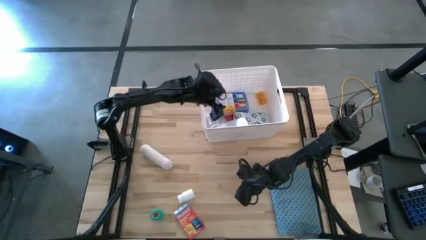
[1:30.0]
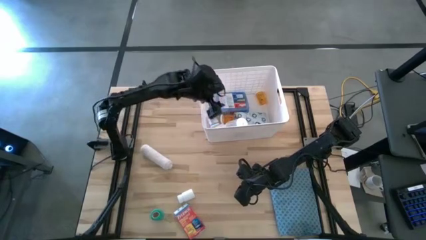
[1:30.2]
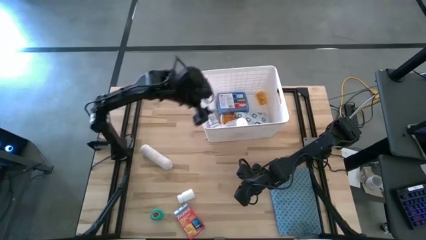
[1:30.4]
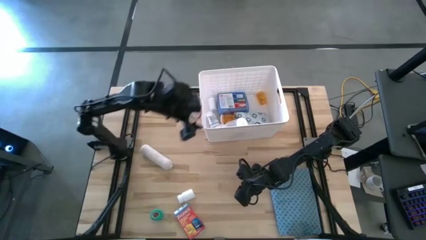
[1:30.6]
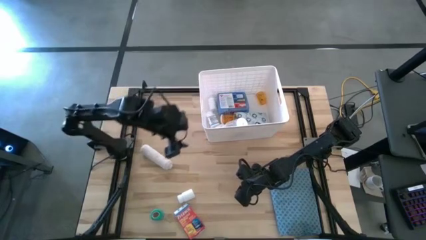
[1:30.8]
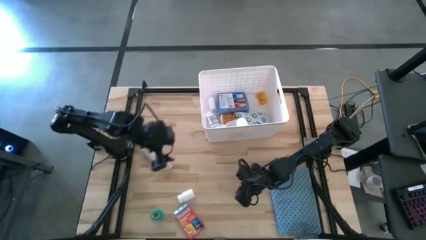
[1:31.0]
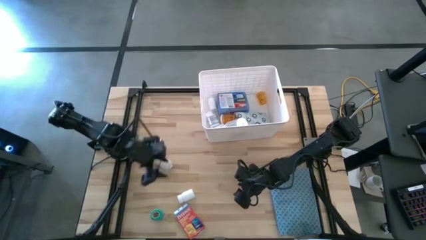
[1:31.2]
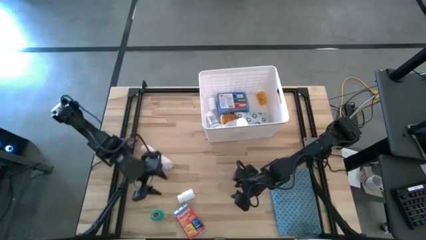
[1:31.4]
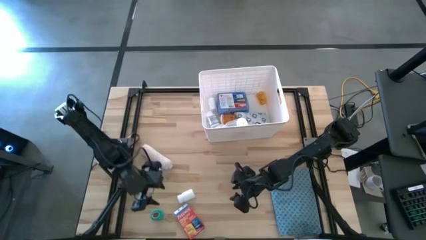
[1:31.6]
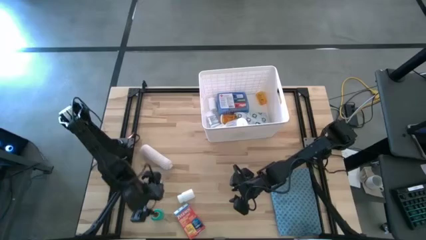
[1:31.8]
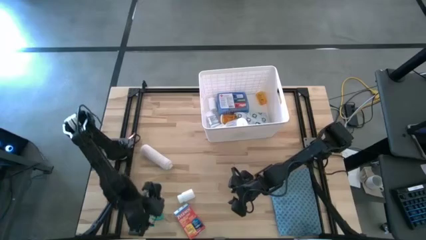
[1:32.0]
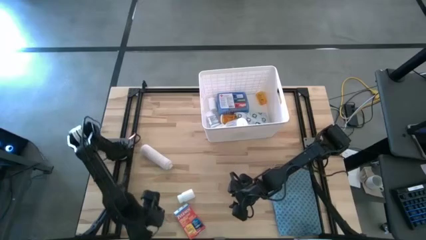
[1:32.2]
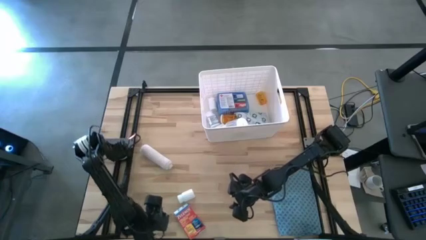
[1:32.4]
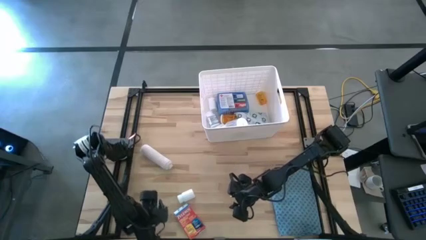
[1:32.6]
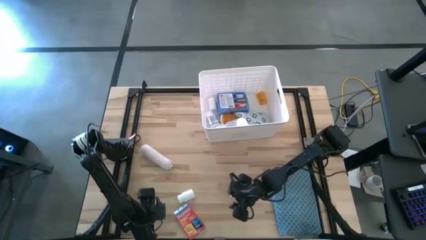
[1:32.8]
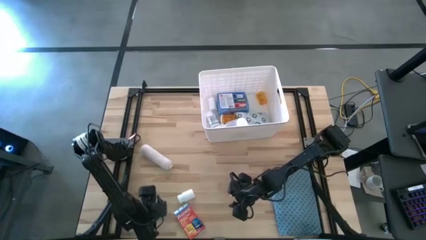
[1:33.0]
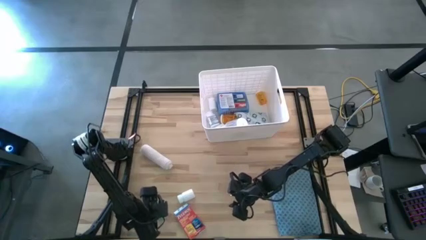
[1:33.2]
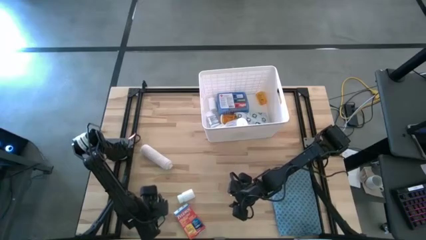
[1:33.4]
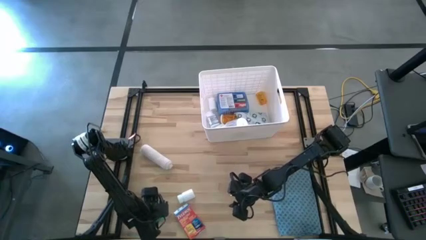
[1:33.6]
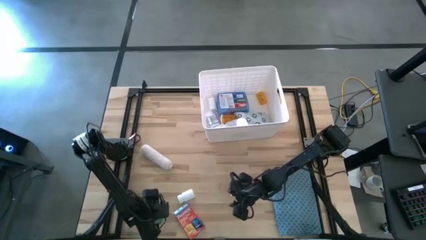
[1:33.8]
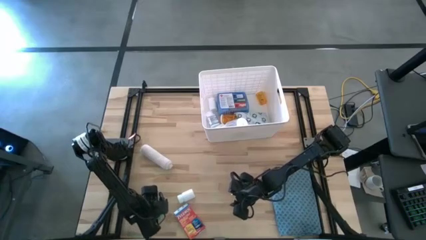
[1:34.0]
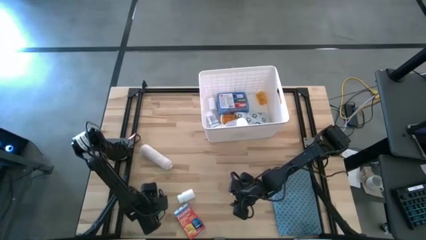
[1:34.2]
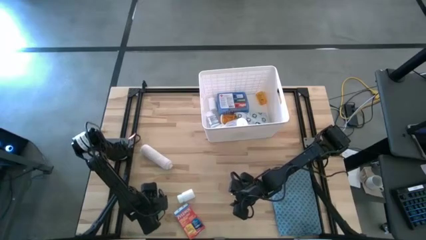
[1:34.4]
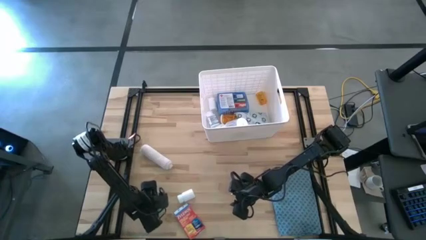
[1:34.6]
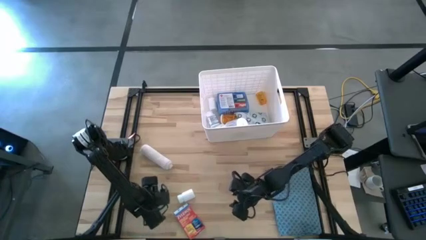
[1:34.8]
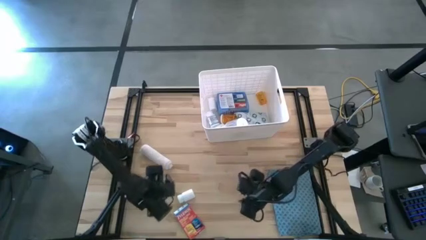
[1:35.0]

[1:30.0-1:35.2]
Task: Pick & place medical supplies in basket/bin
Put the green bandage into the white bin

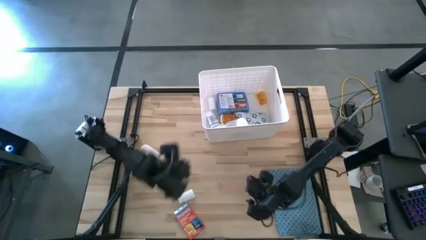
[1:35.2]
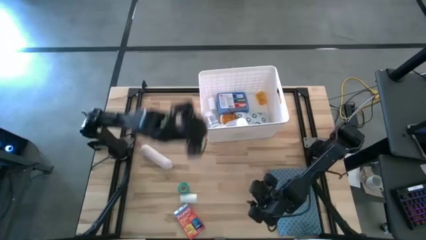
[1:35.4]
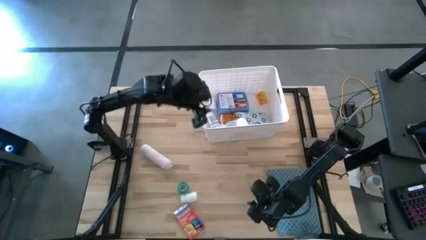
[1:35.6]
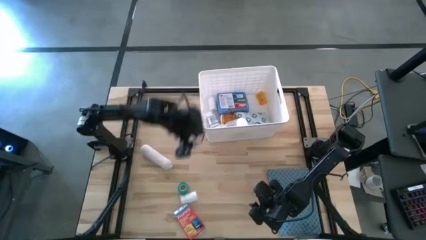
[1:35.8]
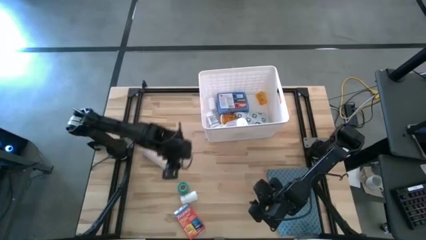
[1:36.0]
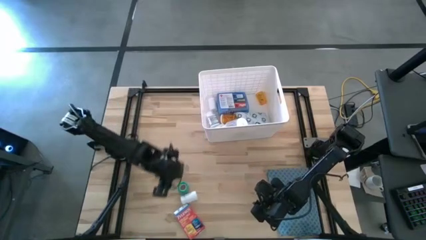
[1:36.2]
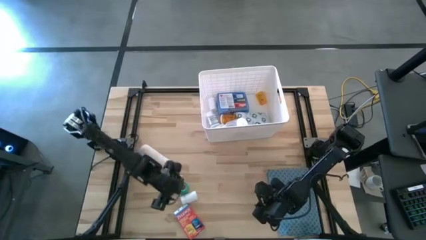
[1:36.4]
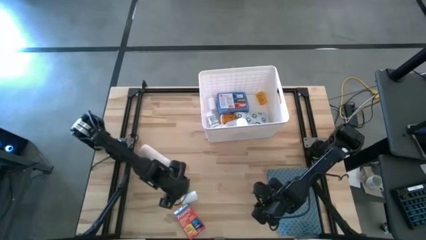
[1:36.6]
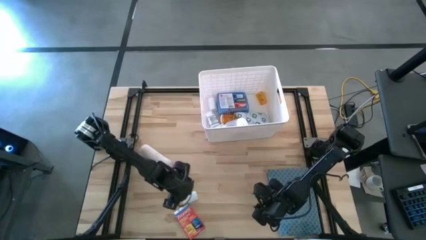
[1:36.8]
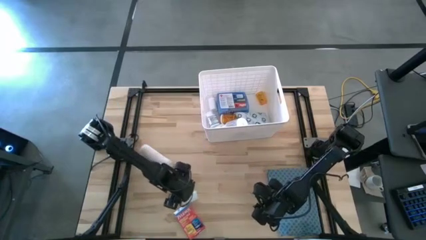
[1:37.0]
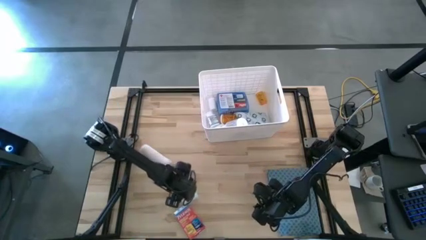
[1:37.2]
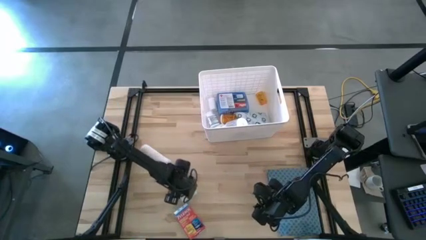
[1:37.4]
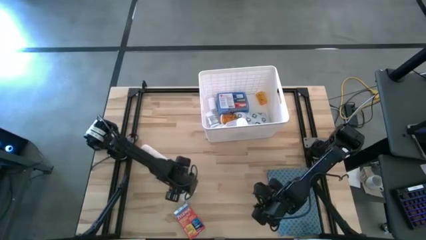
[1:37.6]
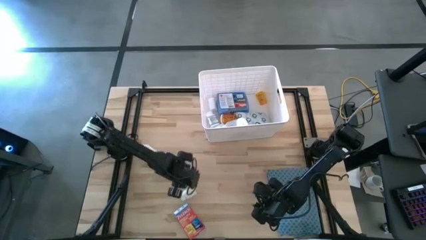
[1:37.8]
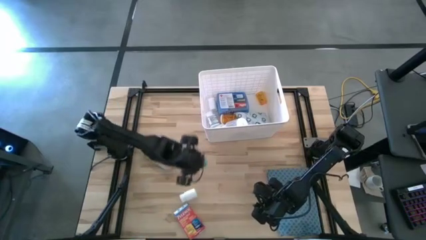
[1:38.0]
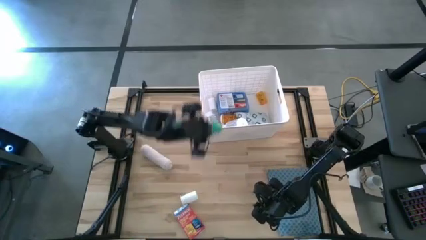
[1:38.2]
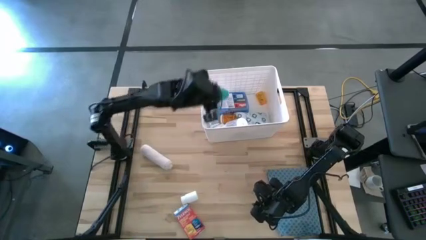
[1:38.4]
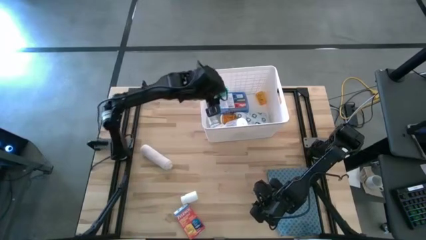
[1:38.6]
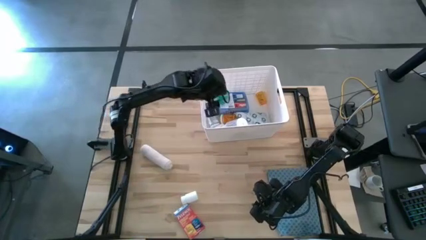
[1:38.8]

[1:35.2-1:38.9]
Put the green bandage into the white bin

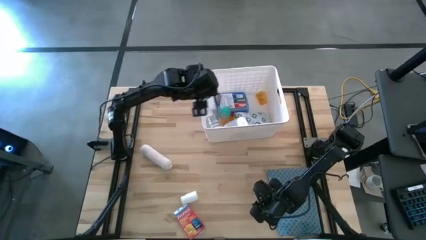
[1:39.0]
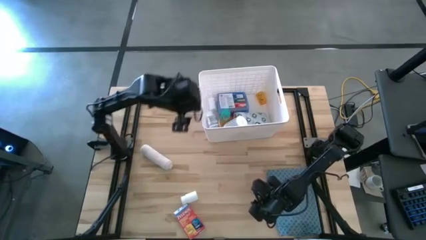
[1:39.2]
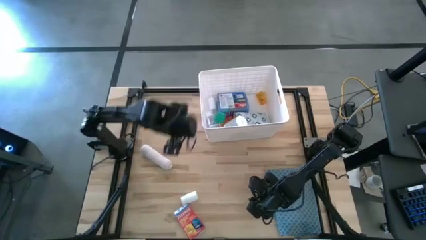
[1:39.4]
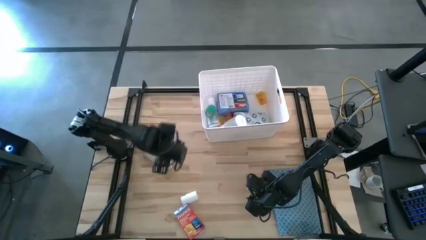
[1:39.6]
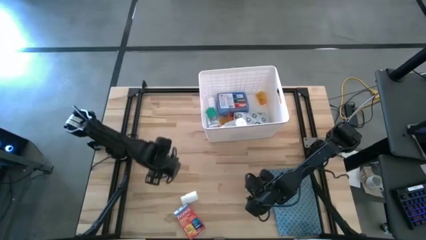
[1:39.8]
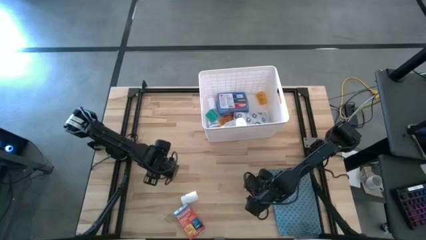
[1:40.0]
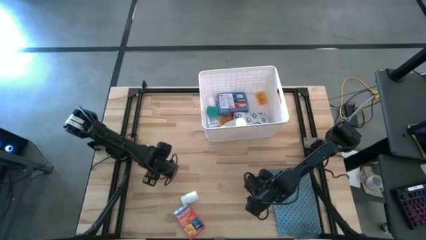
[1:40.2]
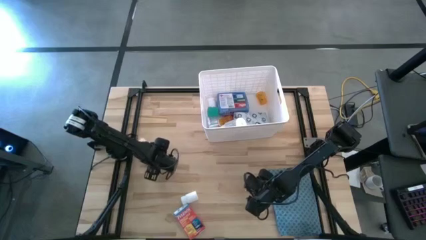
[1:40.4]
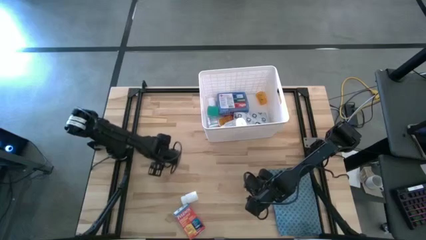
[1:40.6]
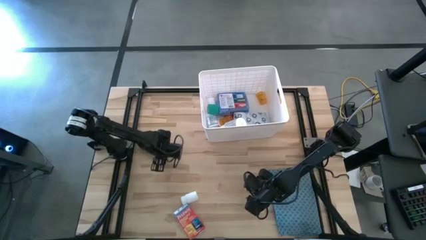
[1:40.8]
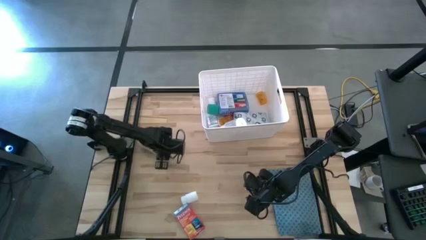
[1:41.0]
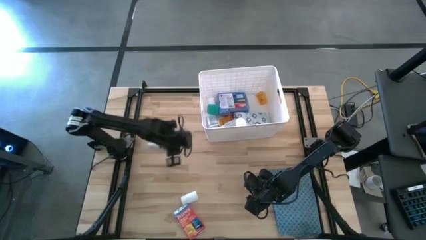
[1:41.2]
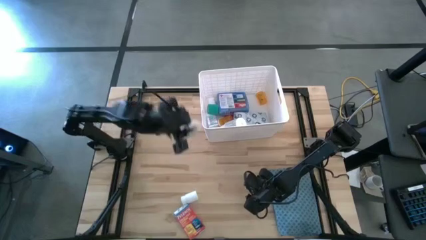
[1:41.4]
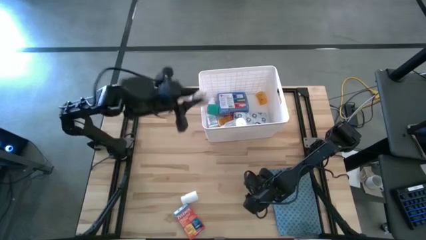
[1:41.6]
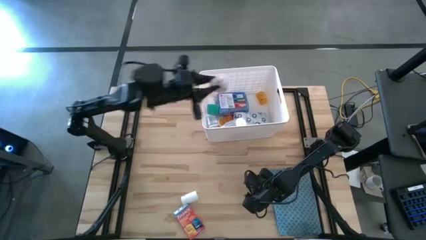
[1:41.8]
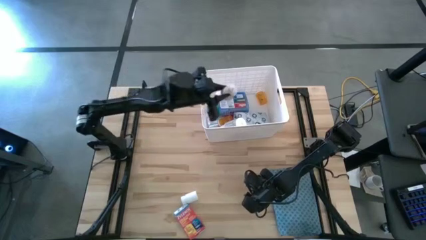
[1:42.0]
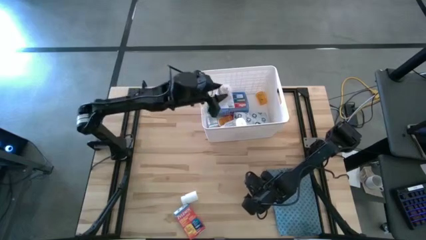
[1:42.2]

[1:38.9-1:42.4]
Put the white bandage into the white bin

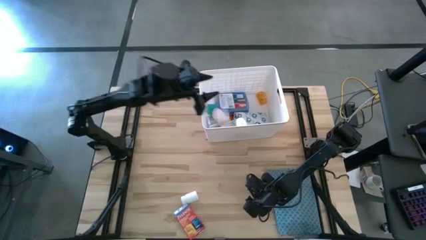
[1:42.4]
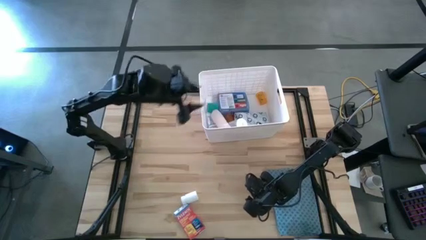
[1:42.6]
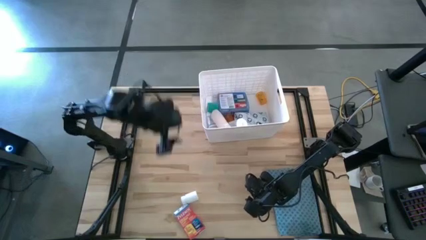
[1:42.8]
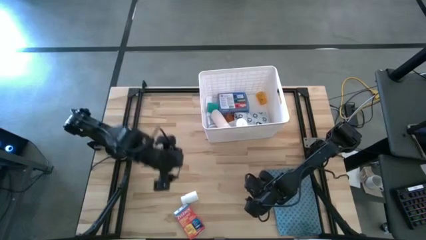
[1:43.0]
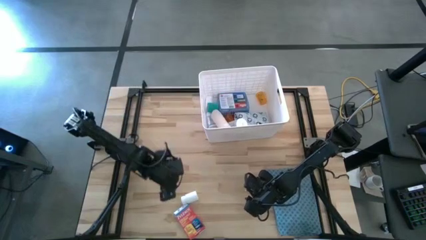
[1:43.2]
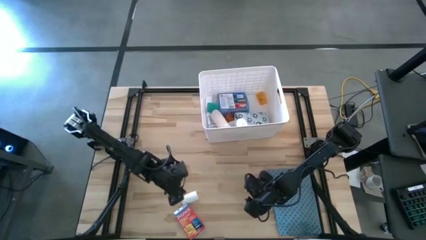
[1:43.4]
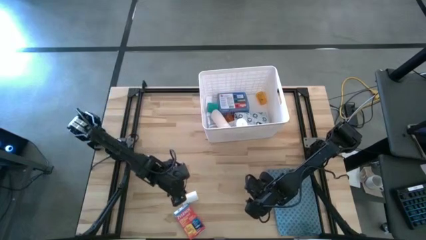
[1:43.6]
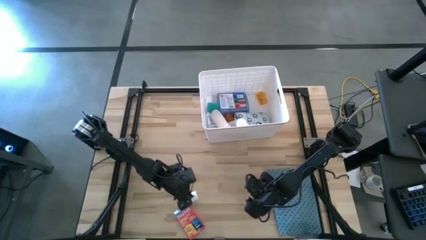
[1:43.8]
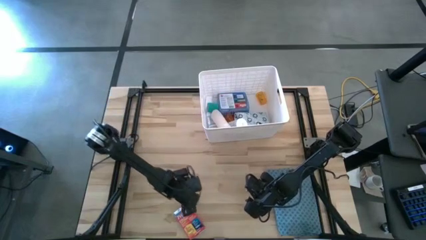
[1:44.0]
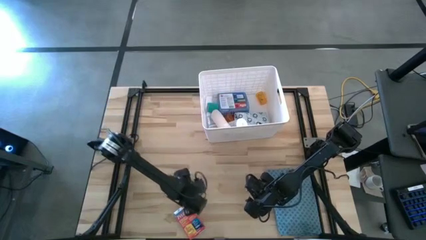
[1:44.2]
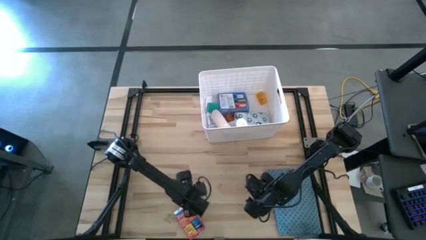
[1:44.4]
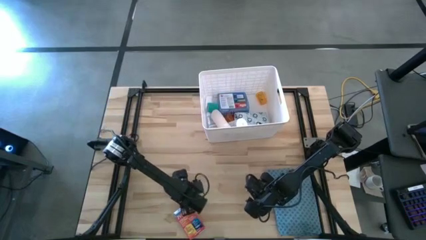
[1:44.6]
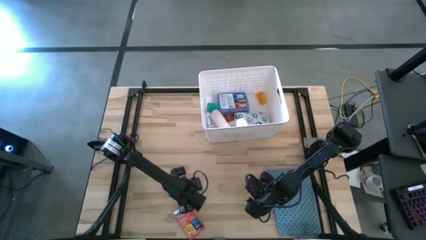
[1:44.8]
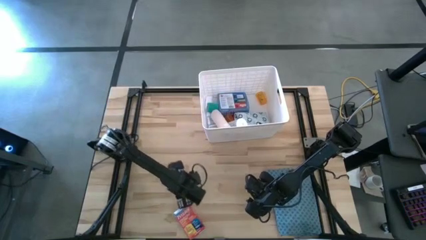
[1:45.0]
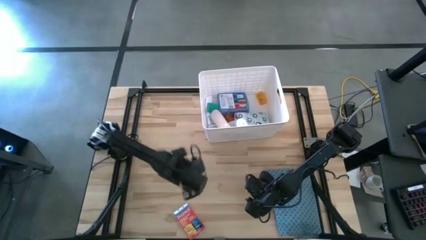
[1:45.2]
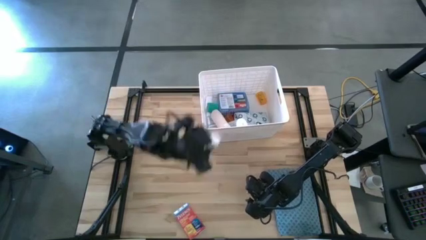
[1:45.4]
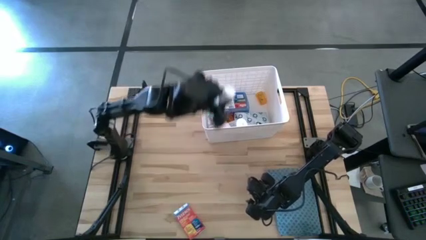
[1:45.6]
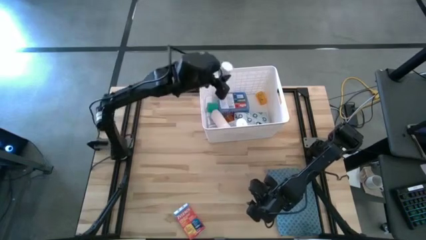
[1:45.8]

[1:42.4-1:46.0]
Put the white medicine bottle into the white bin
